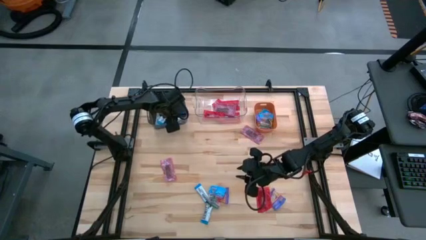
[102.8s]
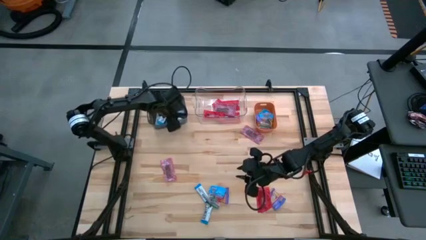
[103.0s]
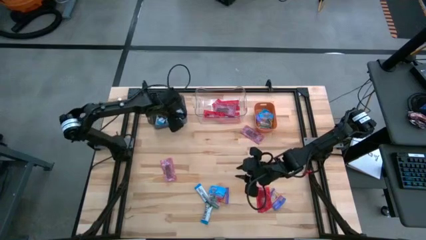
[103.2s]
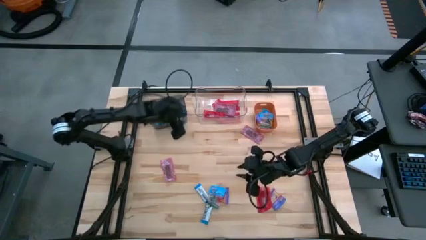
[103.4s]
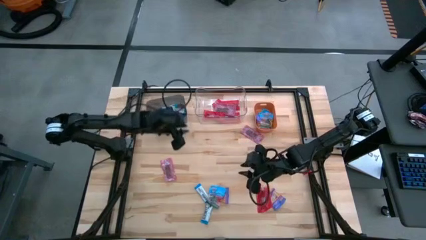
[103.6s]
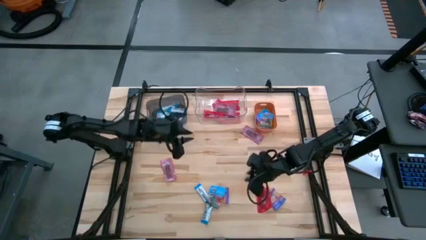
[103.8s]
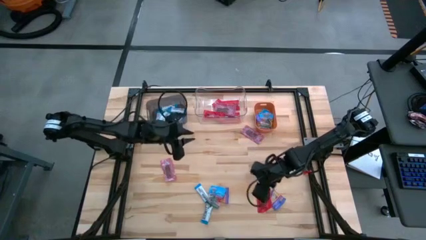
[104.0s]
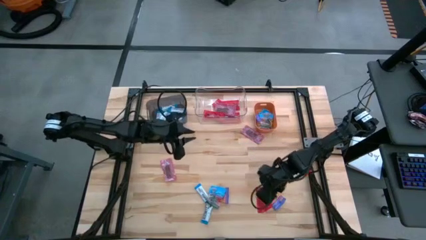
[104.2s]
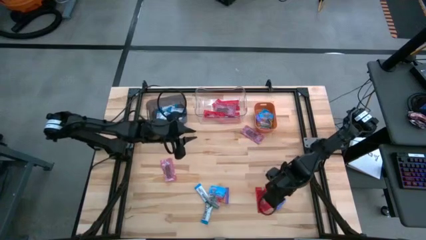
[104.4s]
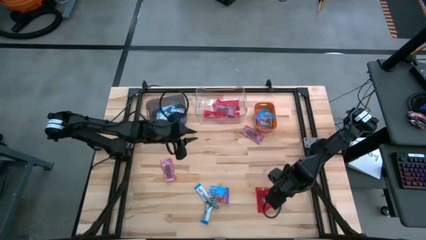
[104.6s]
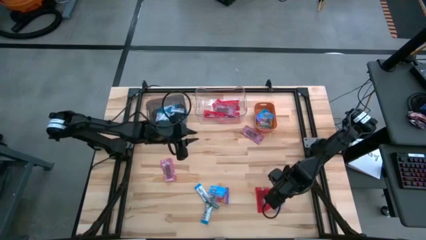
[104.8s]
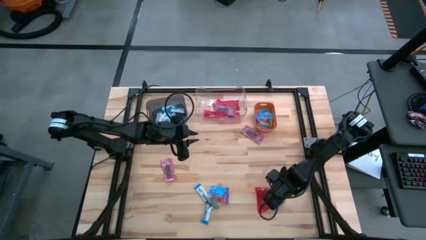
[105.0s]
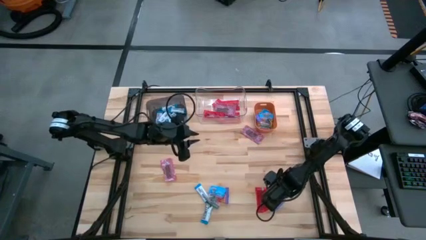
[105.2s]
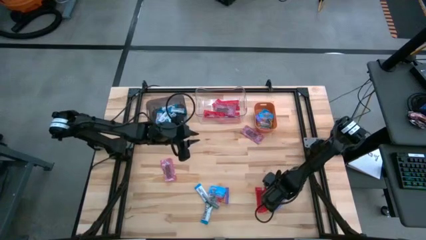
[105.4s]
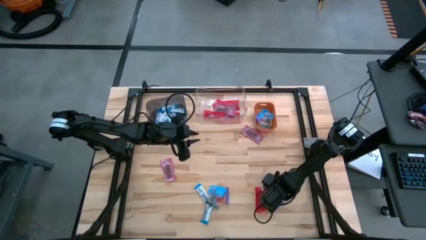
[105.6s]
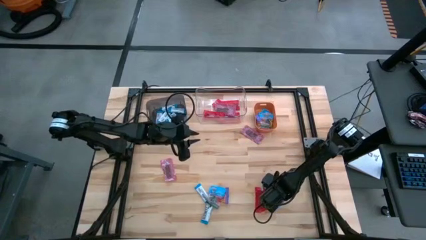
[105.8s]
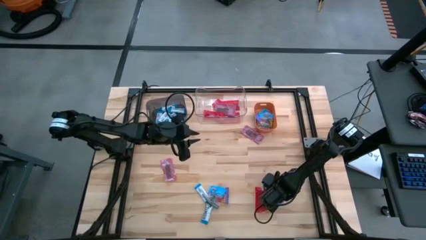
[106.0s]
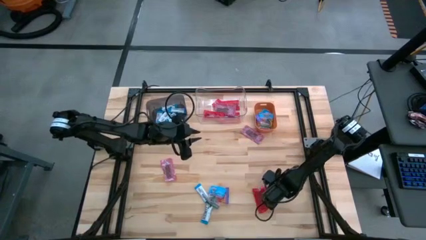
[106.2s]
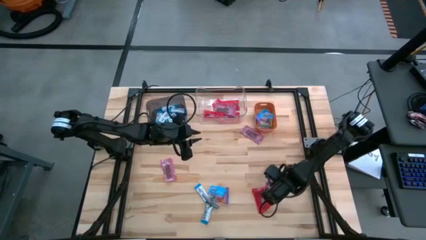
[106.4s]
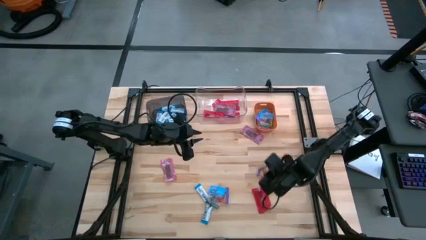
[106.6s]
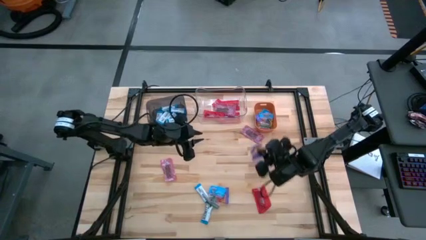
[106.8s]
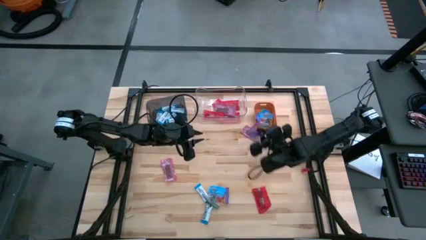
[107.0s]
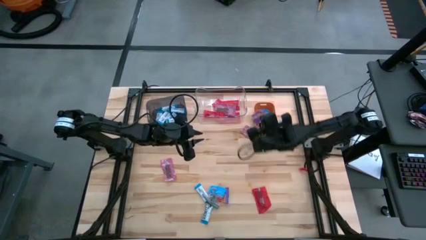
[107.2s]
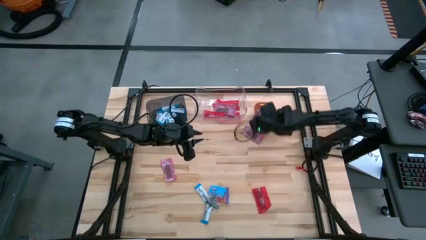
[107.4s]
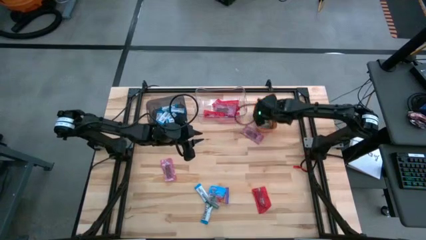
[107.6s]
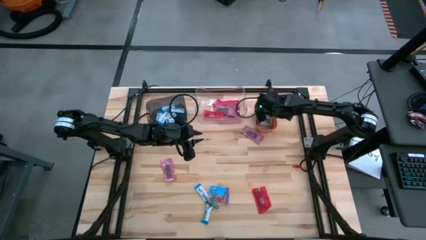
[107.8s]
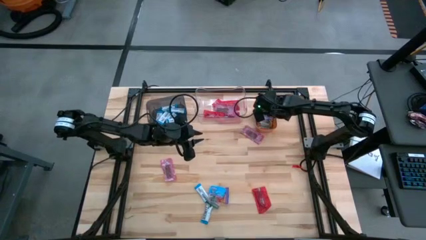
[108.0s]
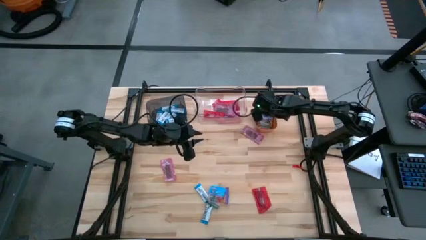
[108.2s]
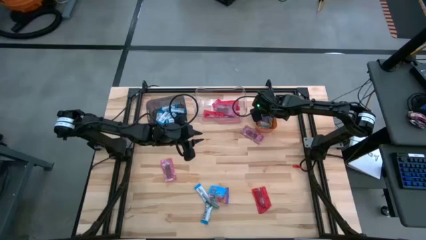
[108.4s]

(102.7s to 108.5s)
Task: Sort candy
Put the blue gummy into the orange bin

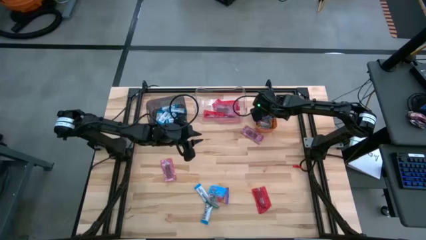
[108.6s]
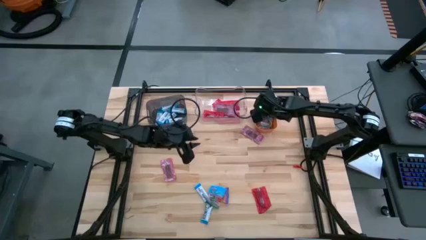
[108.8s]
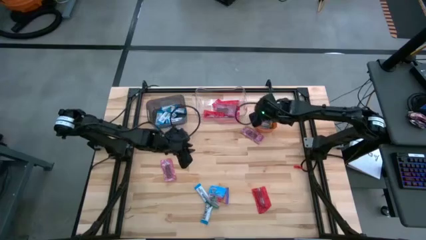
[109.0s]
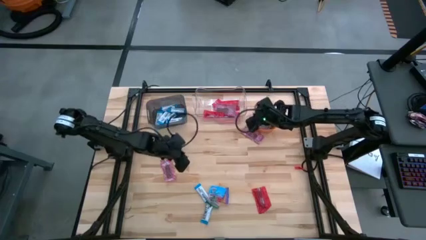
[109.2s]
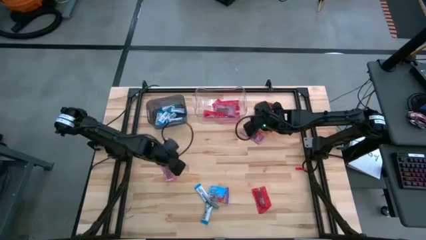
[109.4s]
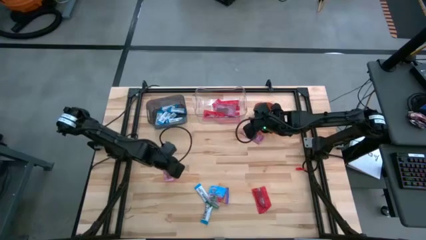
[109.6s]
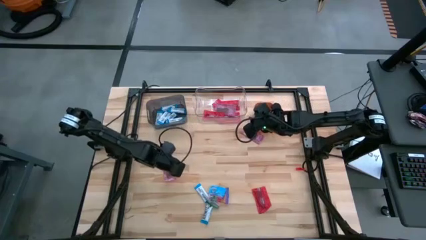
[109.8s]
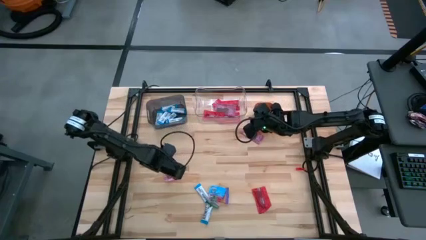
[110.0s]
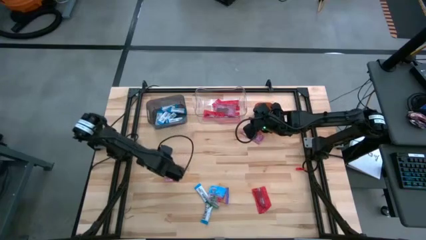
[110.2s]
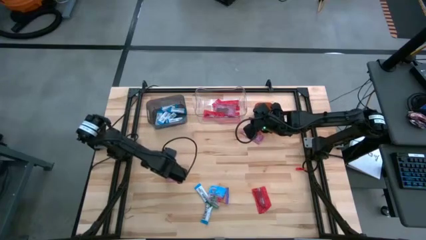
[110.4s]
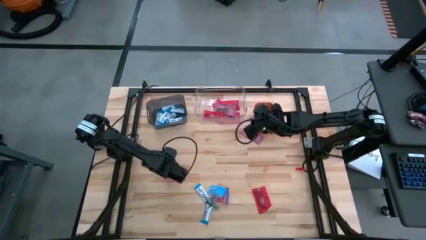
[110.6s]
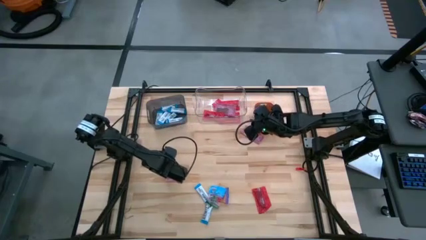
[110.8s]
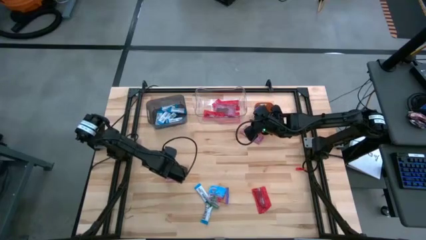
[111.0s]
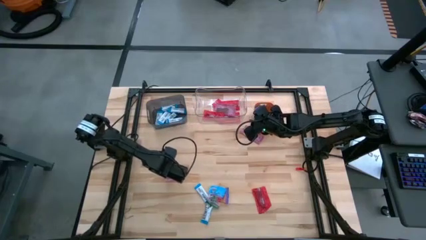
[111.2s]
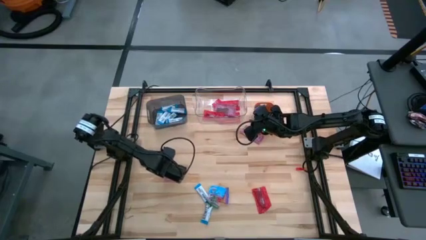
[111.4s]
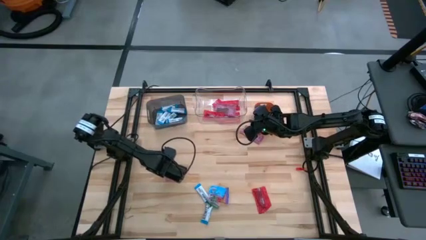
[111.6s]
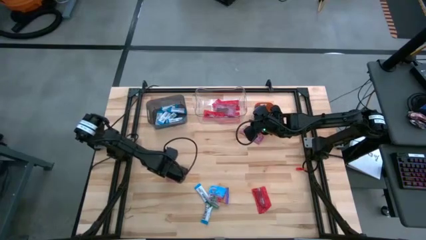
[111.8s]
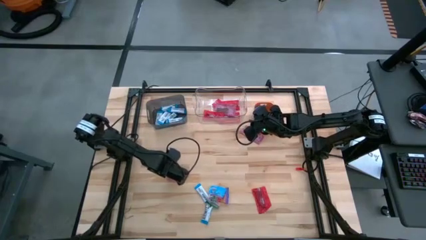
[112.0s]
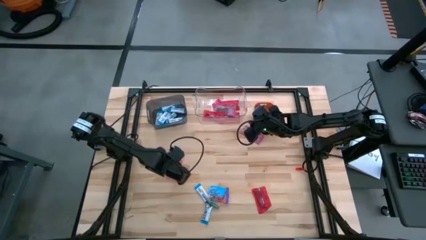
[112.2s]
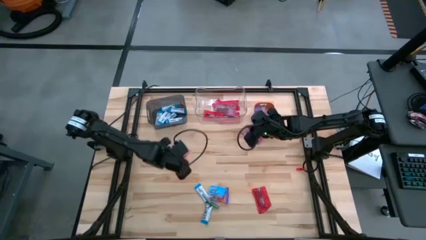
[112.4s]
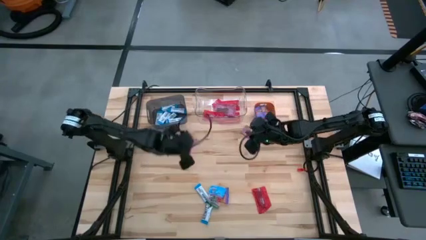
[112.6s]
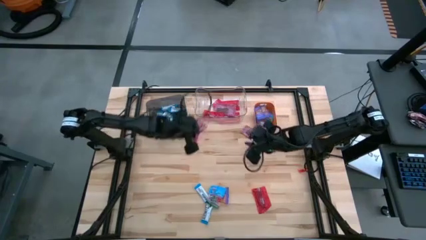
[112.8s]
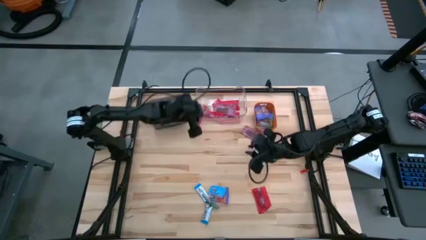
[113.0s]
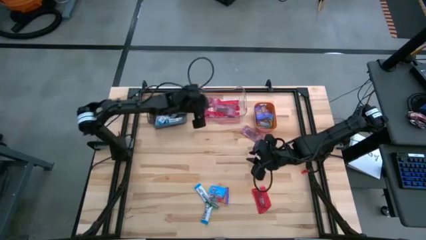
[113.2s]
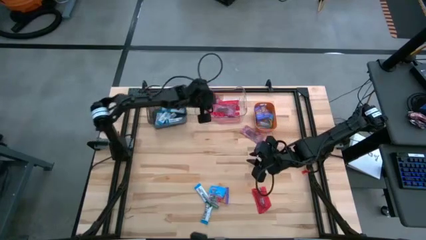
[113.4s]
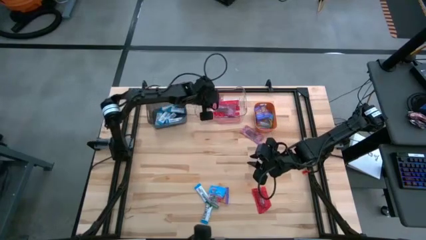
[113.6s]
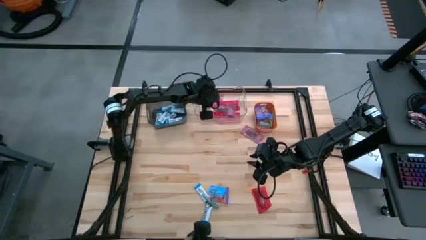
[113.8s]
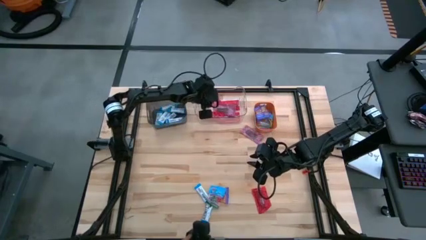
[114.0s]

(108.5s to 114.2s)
Put the red chocolate into the transparent bin

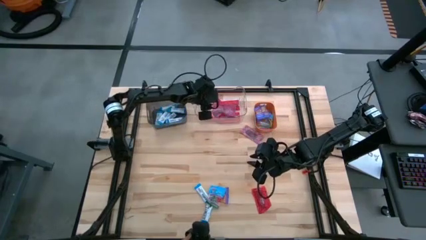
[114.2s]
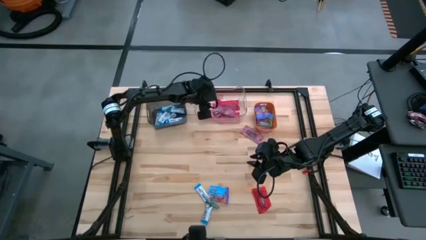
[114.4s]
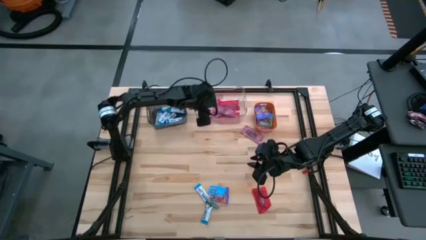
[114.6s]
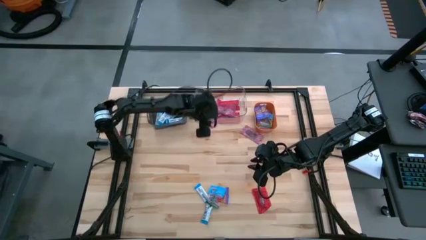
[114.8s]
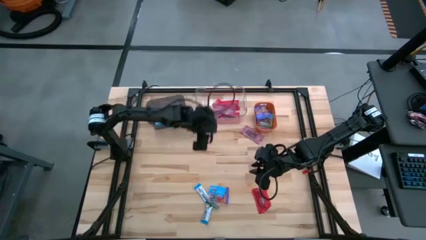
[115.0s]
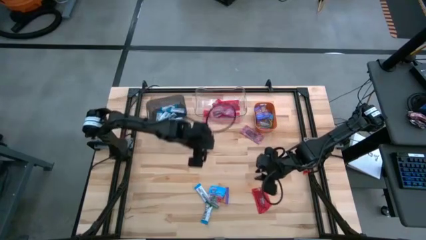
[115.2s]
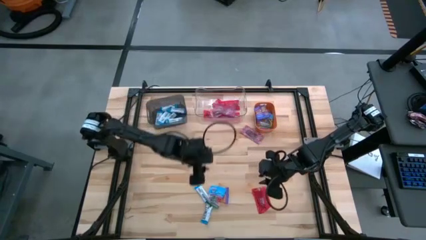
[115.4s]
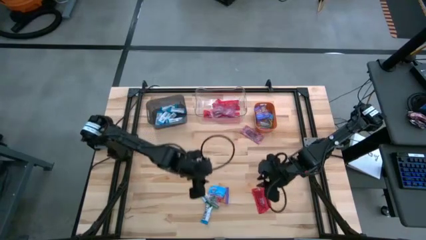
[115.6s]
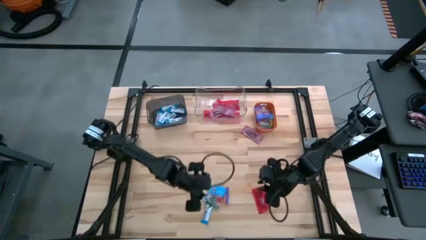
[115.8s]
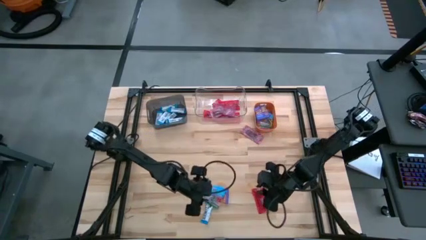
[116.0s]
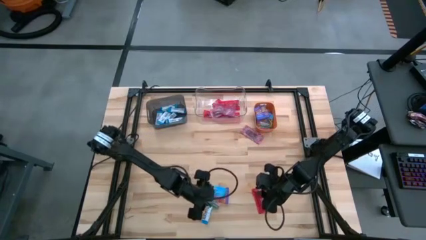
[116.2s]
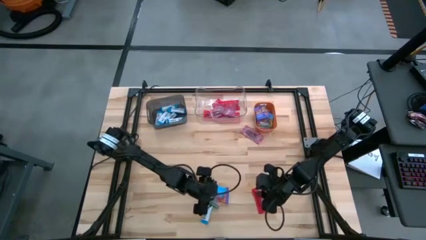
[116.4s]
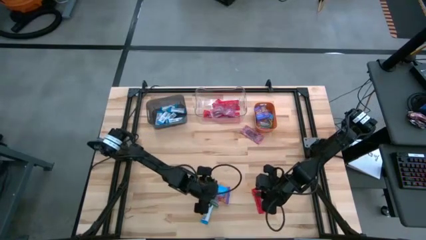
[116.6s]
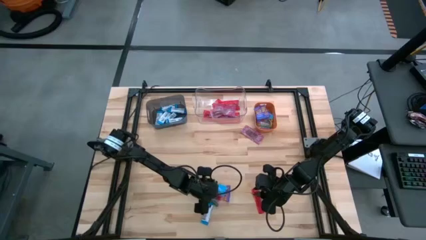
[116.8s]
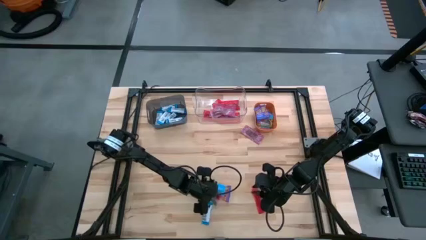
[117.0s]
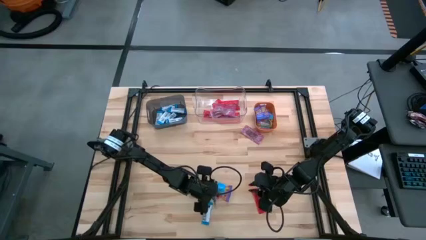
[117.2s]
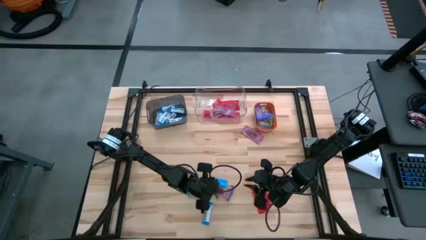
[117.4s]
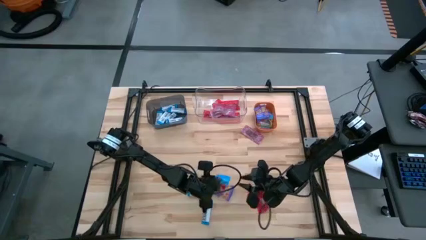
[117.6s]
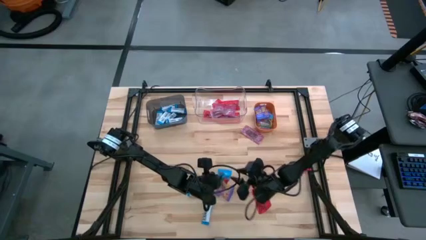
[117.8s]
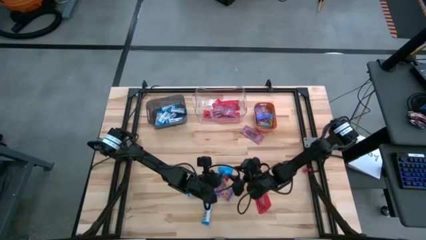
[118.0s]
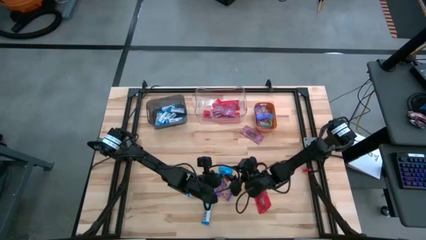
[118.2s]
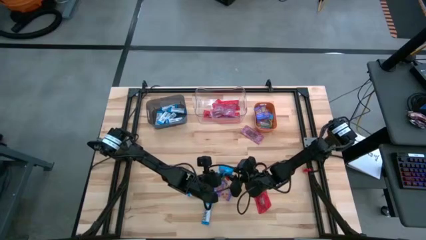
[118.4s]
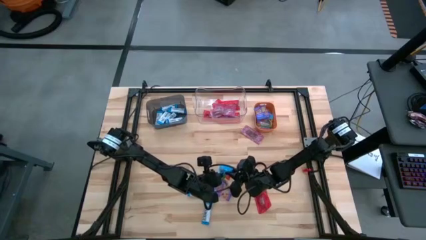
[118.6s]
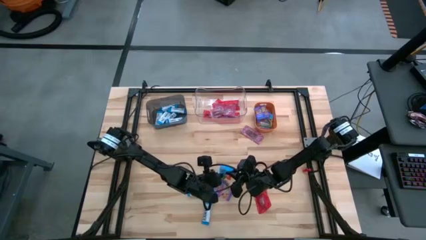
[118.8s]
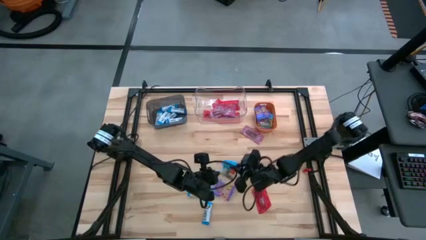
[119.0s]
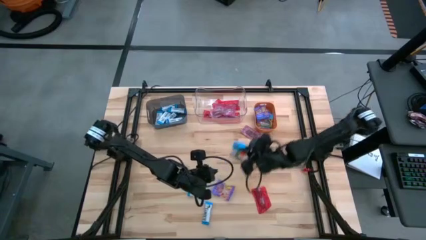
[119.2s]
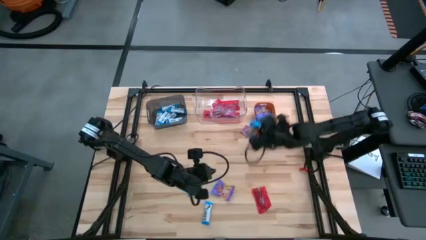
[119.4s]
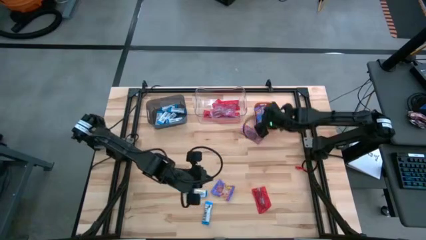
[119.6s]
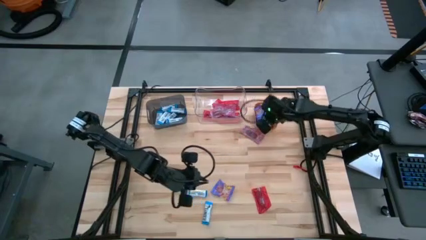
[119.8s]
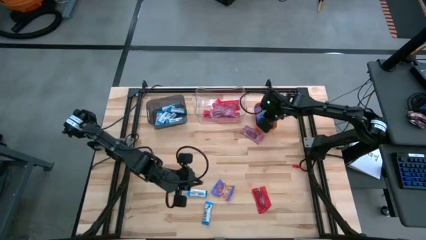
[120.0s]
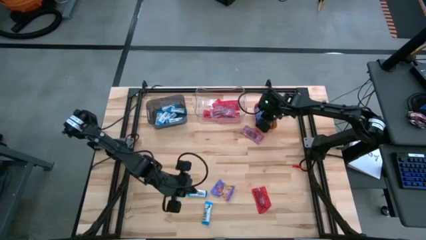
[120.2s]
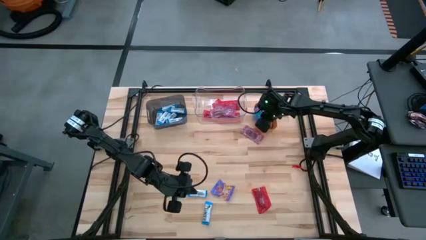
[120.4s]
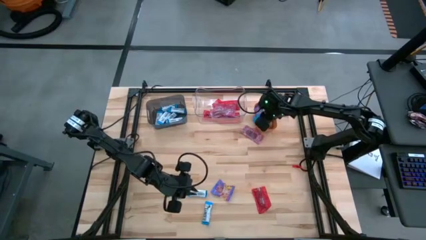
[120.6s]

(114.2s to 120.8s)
Put the blue gummy into the orange bin
